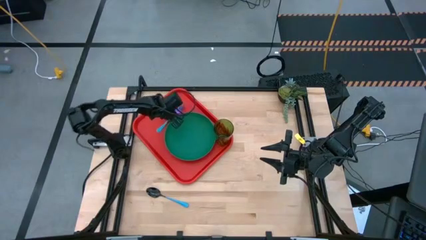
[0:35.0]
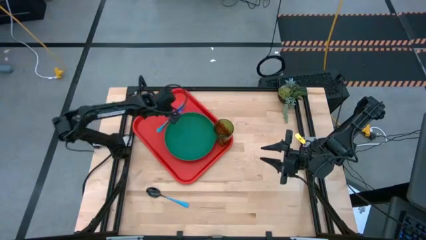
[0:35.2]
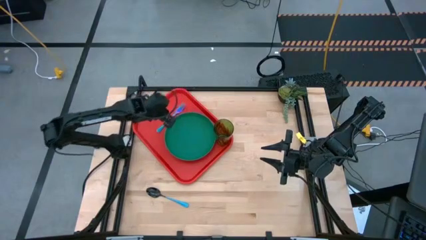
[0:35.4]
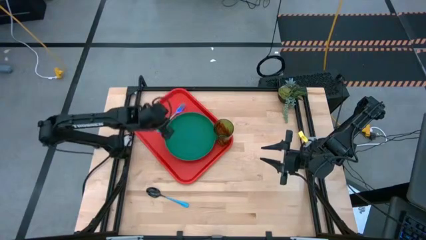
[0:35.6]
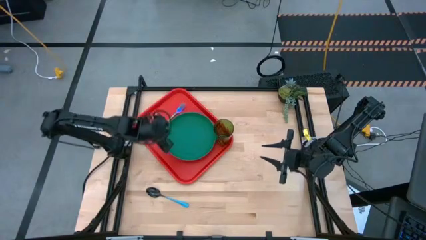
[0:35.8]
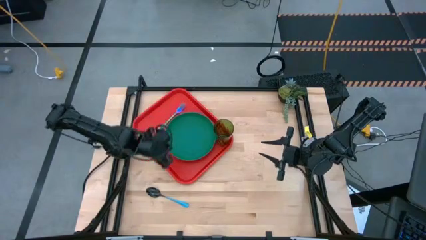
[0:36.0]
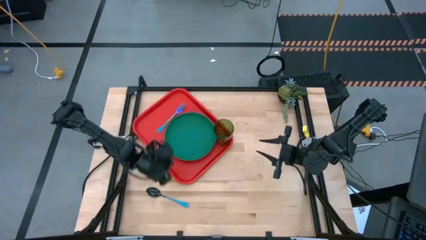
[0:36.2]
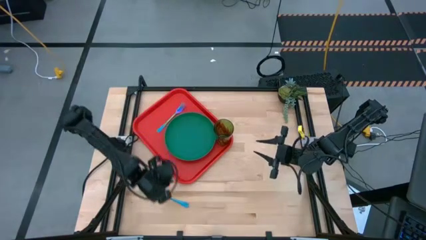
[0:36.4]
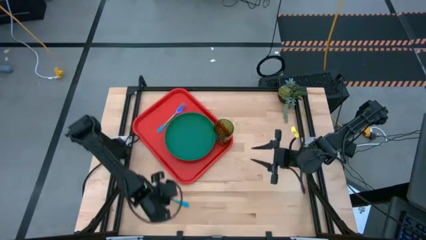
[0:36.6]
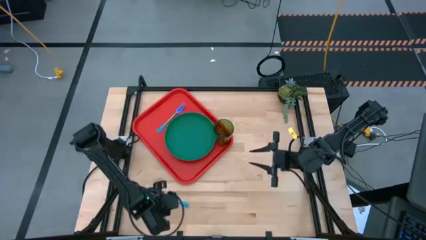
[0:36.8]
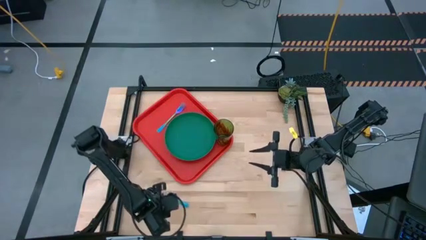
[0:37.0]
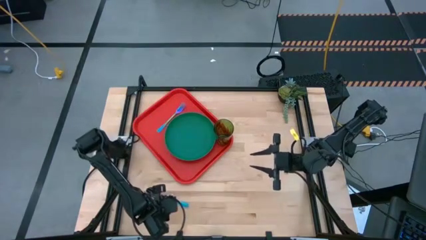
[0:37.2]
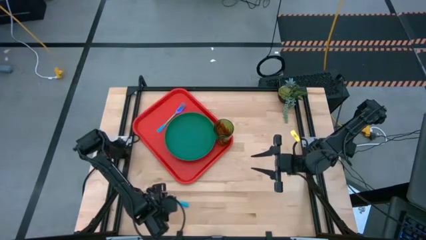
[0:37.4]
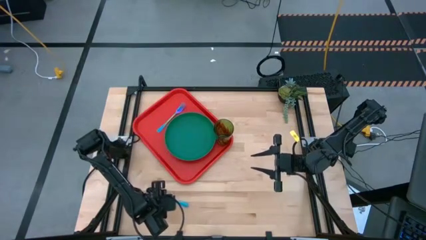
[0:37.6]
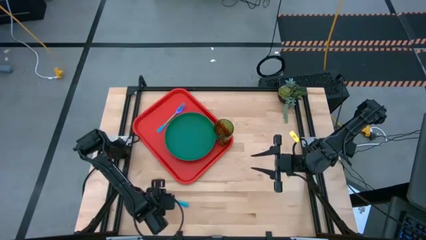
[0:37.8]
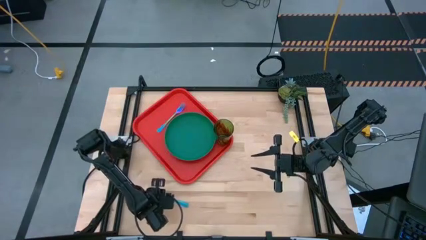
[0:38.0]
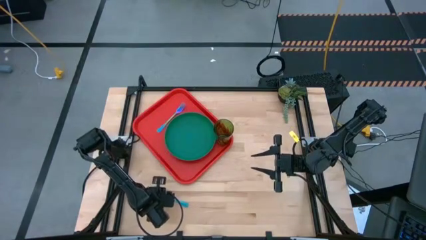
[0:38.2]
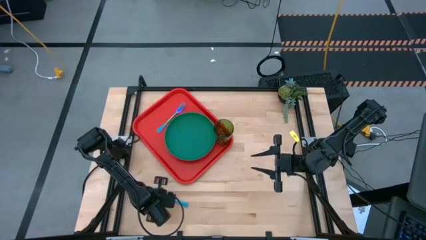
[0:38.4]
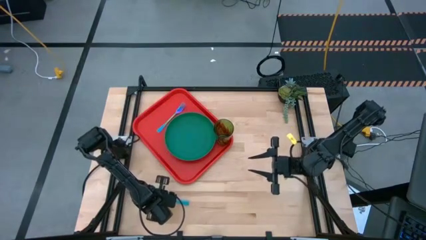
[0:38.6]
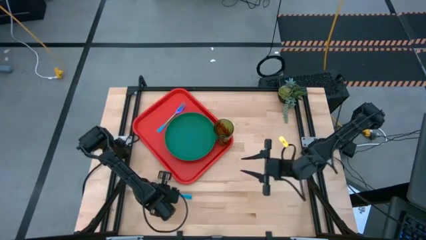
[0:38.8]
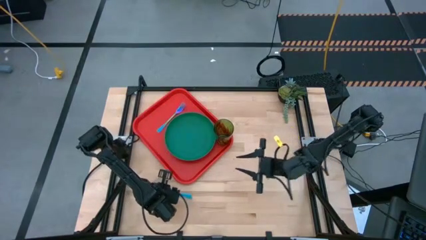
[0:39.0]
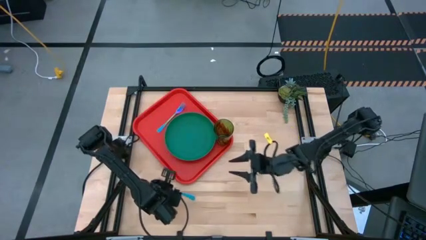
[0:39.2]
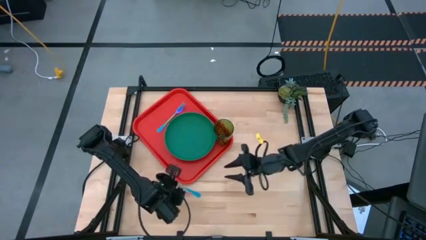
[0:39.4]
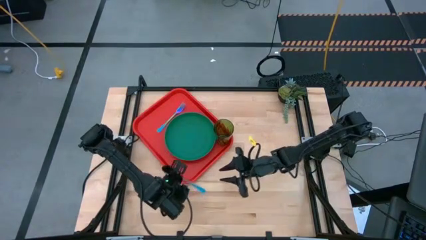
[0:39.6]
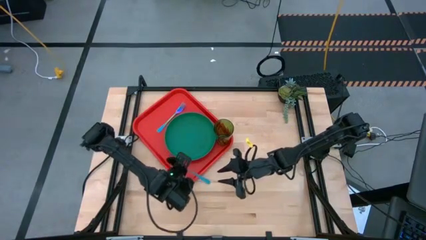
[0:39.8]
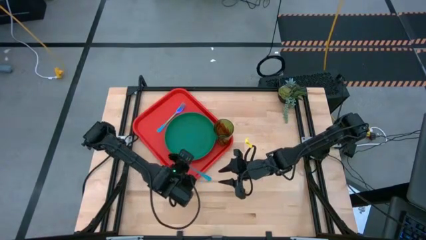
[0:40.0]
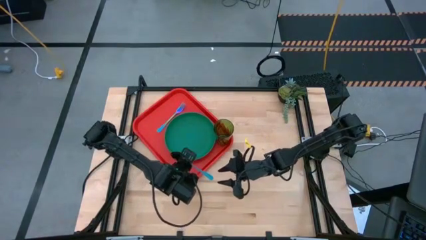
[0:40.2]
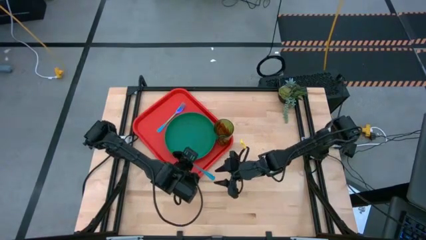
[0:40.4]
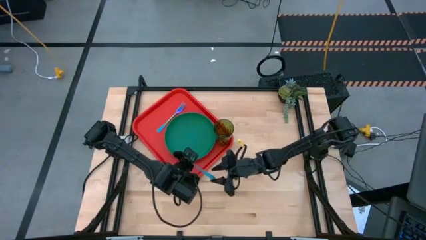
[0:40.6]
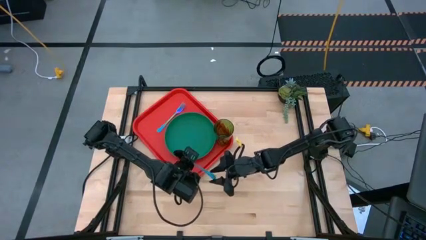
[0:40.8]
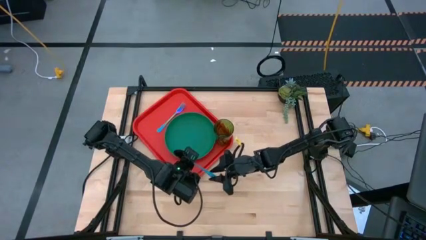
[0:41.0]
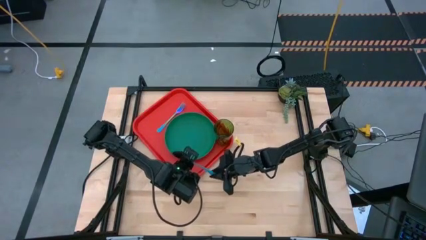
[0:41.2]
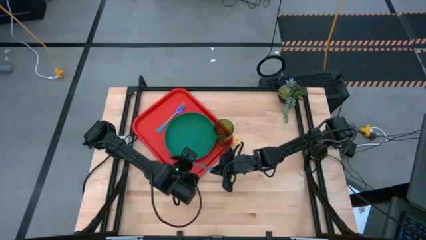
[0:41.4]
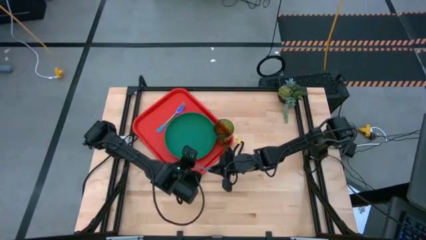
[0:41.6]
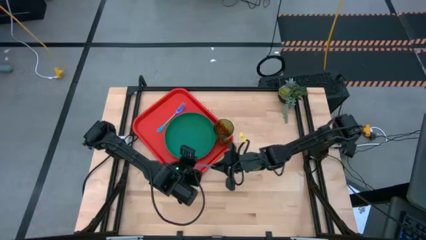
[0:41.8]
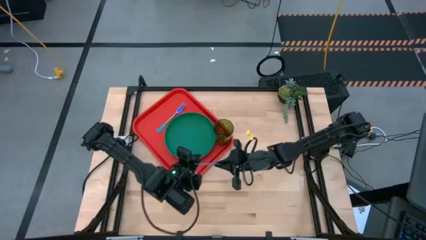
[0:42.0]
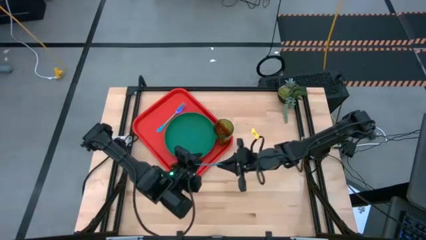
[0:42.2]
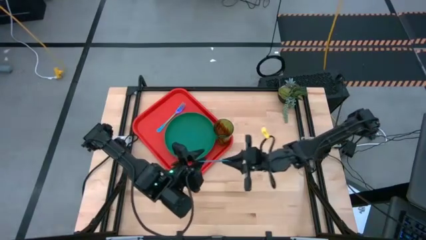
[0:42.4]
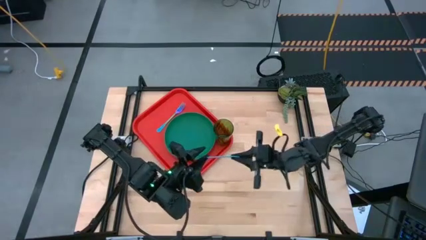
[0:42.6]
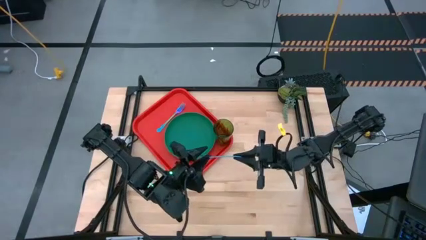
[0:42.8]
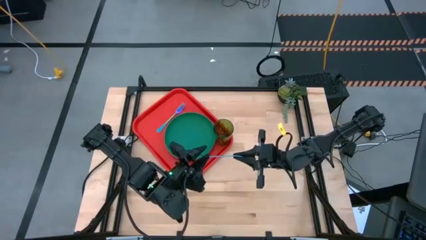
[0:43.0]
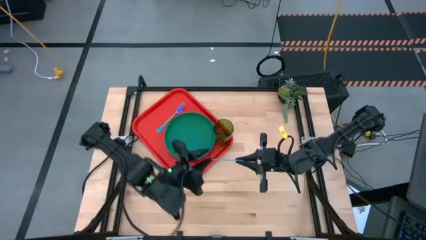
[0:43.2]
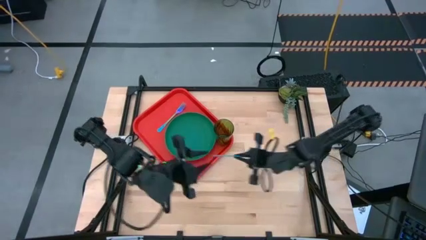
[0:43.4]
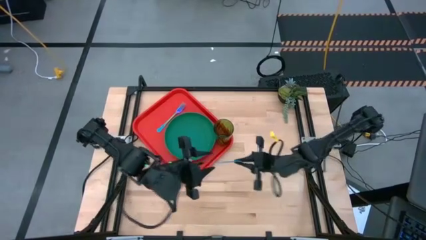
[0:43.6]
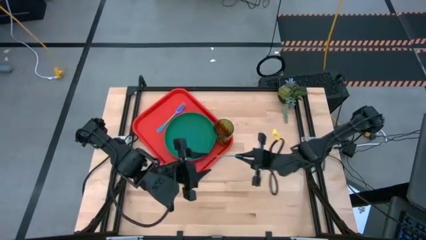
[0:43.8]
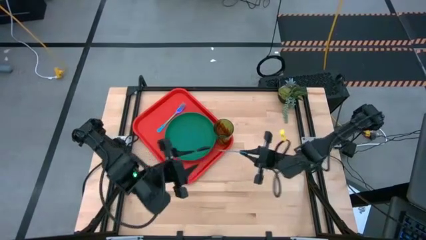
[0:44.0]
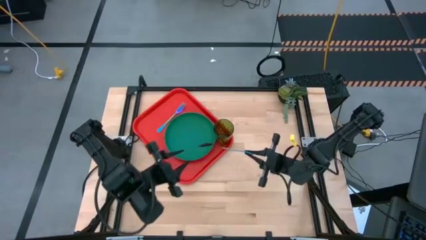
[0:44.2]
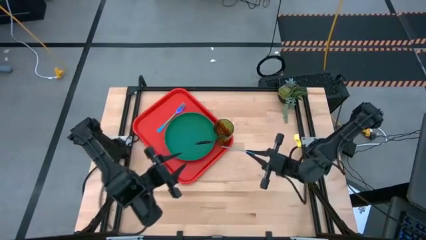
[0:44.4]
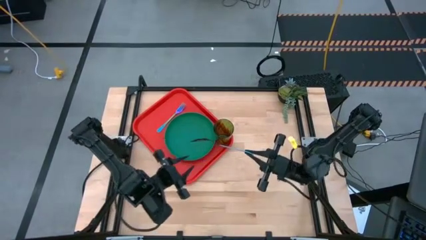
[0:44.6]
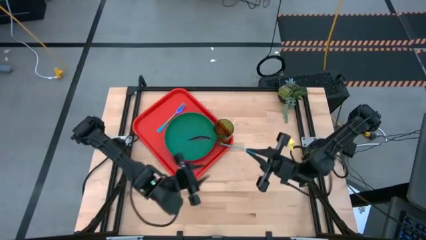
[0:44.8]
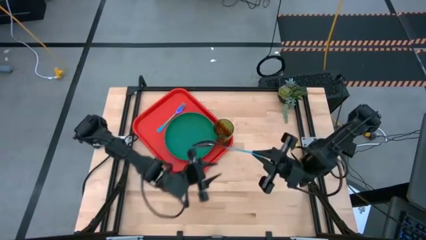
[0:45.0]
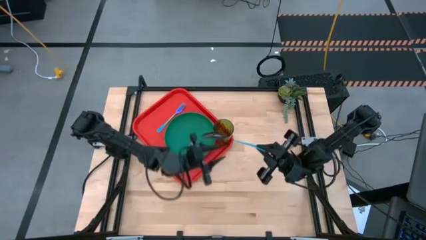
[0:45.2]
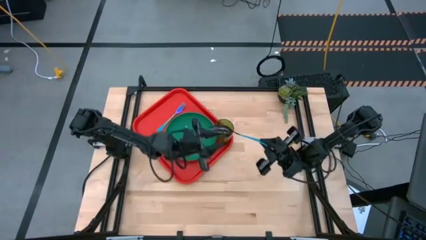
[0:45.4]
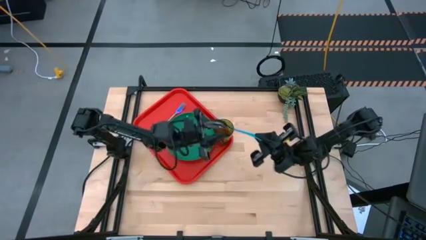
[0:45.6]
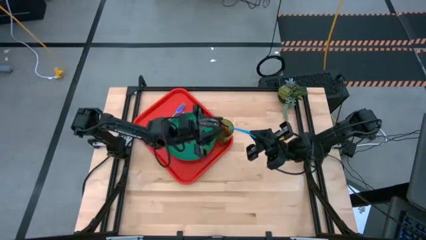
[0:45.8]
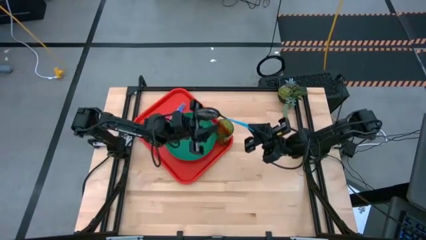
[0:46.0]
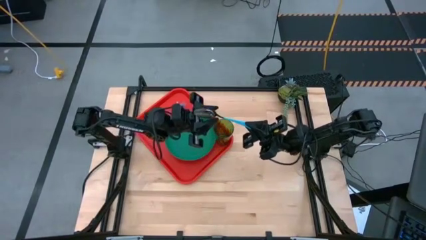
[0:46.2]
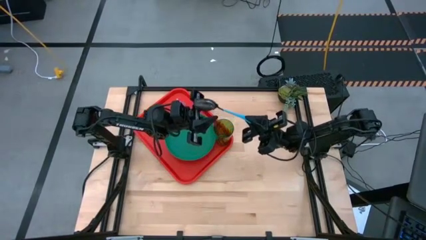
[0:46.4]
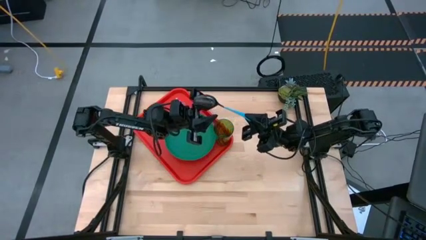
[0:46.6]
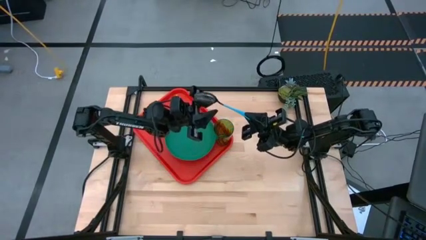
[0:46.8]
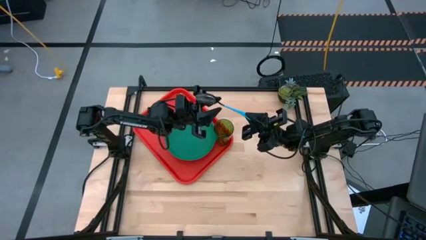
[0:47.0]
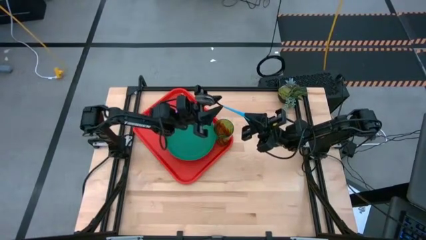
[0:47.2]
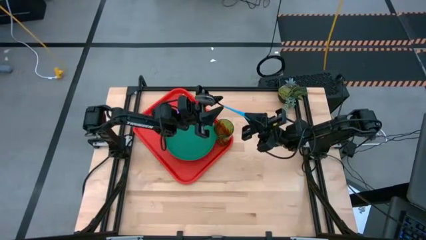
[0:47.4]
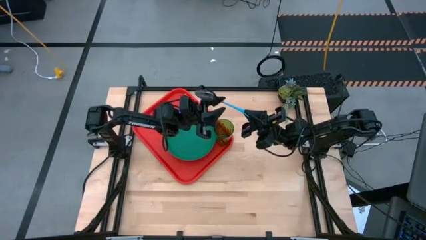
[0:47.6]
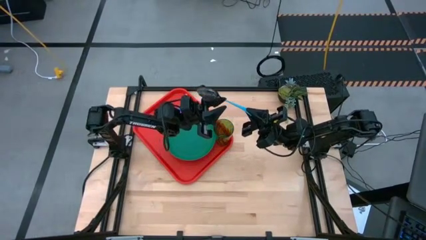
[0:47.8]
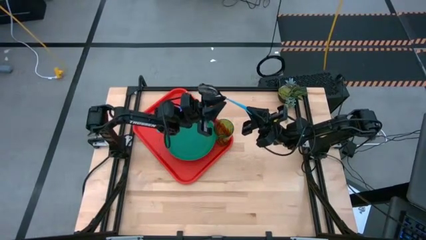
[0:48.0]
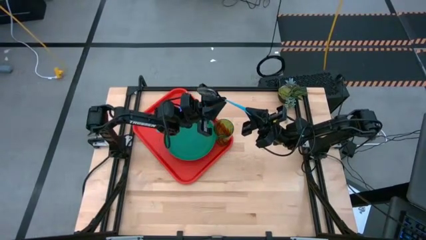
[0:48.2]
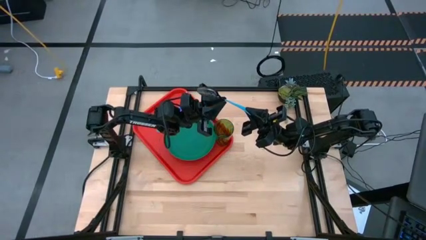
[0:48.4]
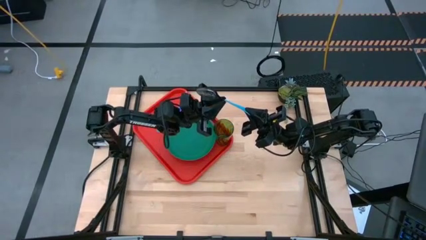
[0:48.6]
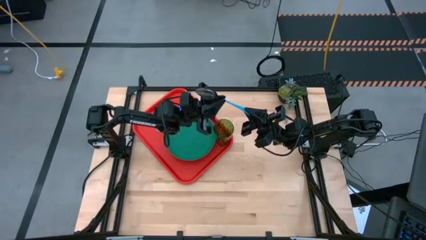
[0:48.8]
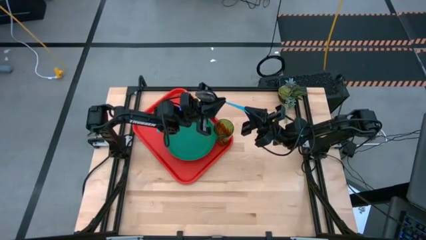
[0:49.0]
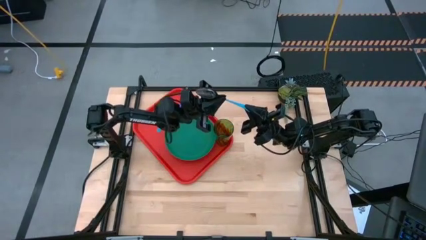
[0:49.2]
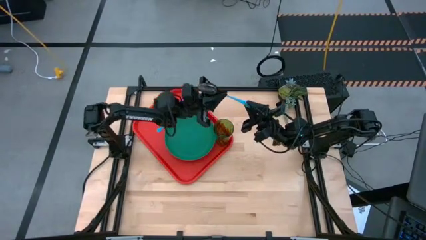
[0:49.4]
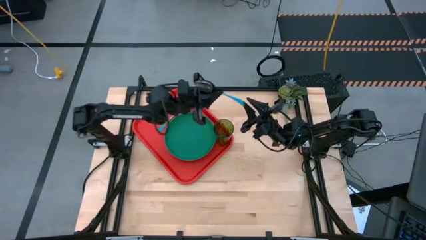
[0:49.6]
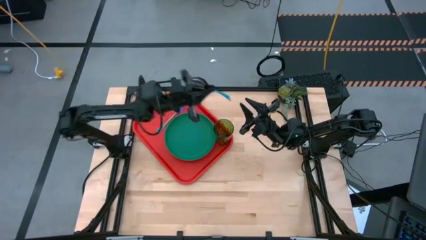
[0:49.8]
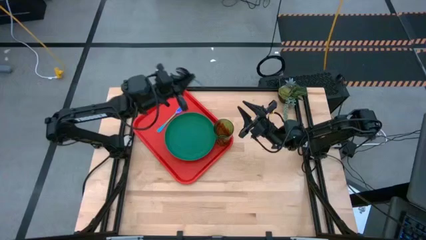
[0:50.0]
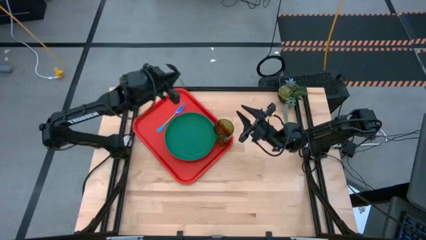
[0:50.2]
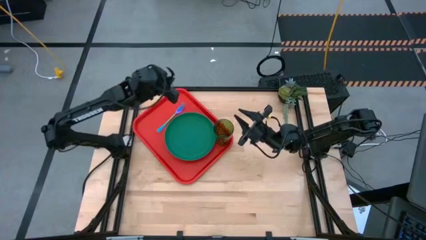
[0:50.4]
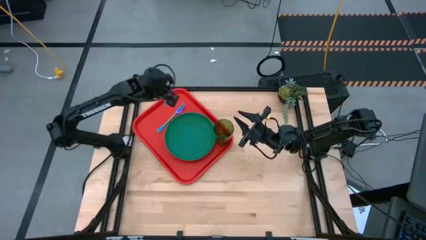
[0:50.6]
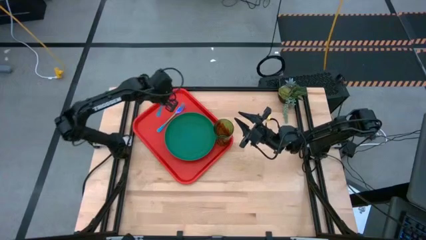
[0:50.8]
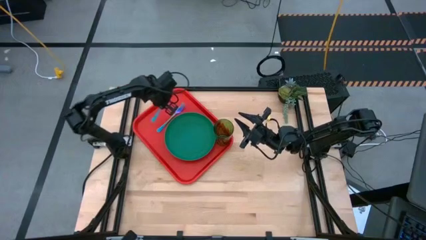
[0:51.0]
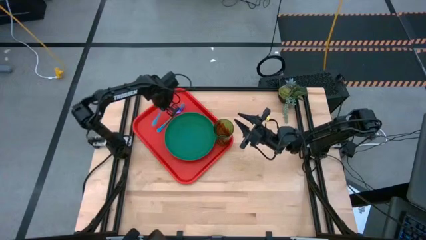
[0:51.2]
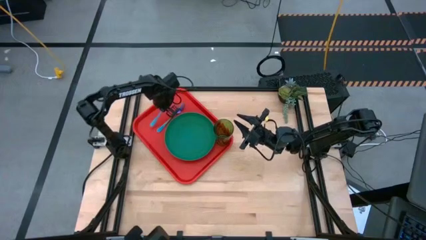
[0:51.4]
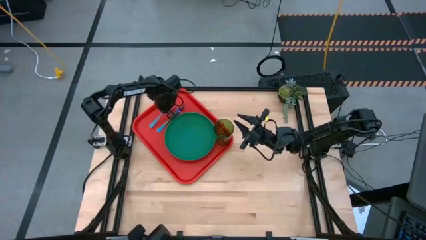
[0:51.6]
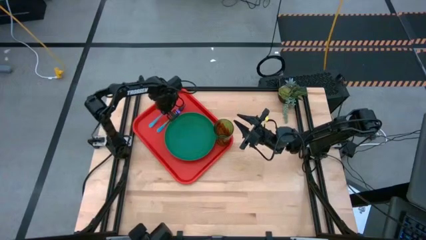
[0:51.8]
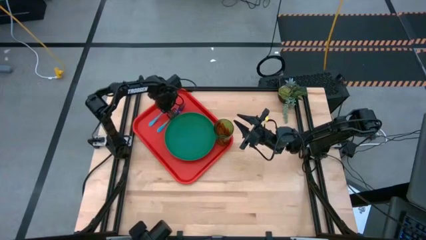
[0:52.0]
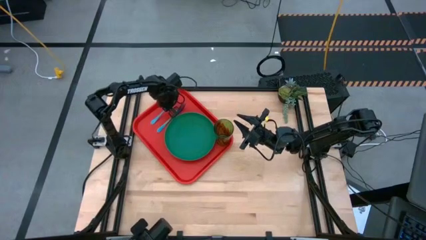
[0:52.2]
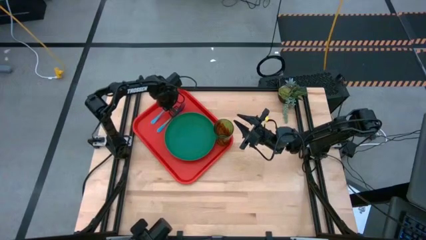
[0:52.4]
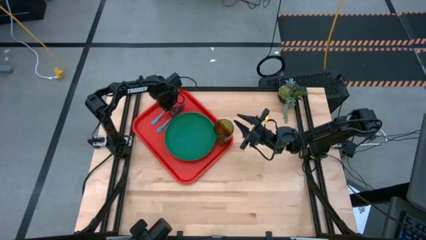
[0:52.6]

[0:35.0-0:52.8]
Task: Pick and place plate/cup/fork/spoon on tray
Put the blue spoon on the red serving tray to the left of the purple fork
